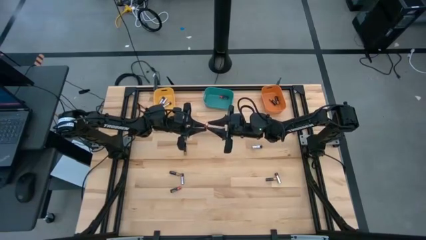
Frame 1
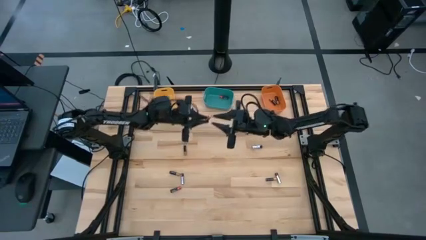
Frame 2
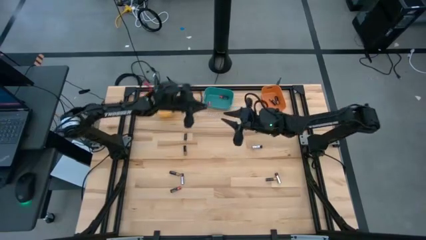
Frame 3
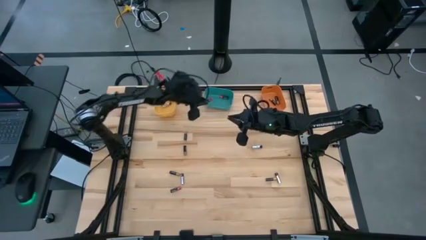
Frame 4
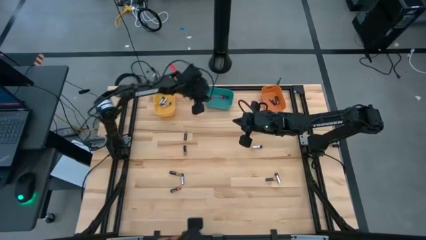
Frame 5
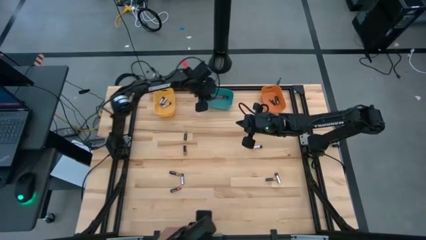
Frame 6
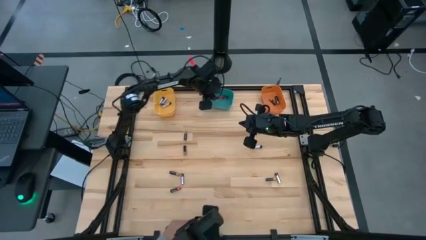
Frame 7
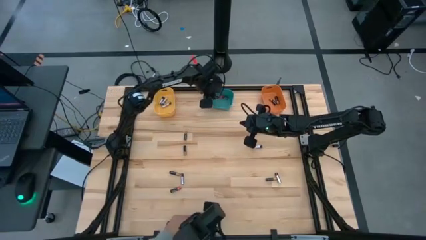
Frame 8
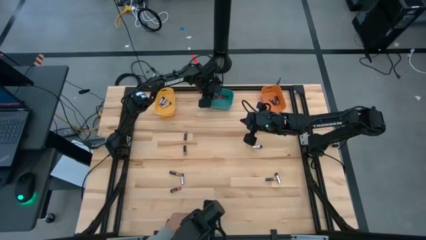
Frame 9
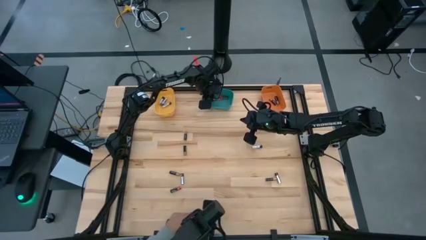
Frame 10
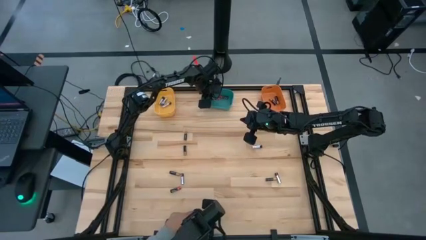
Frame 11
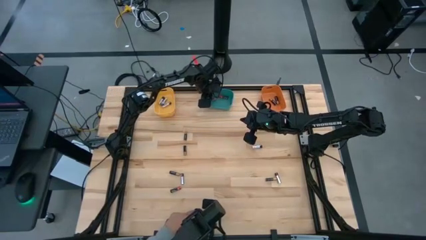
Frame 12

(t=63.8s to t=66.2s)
Task: Sort batteries
Put the red battery into the green bin

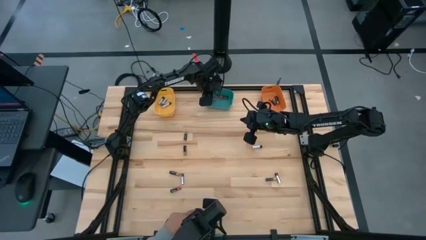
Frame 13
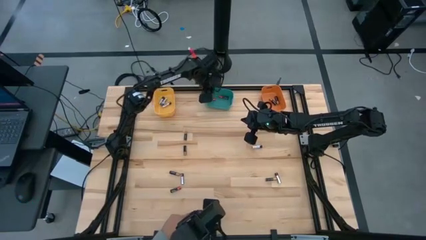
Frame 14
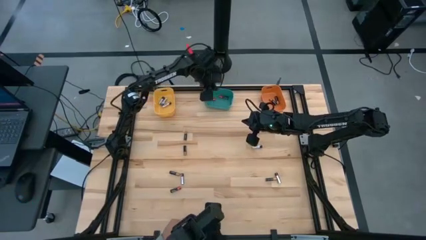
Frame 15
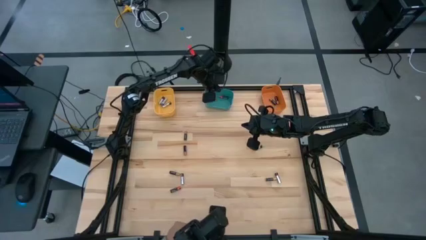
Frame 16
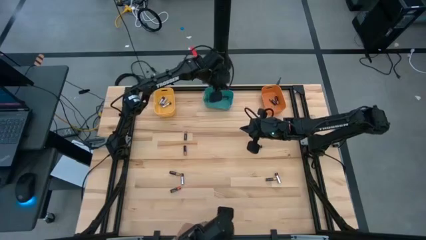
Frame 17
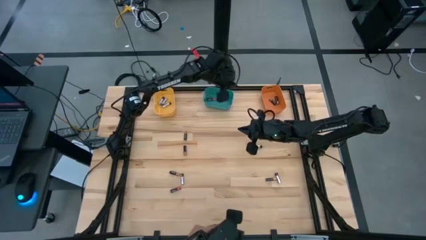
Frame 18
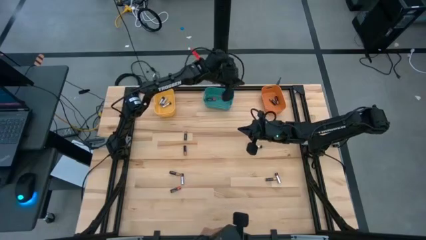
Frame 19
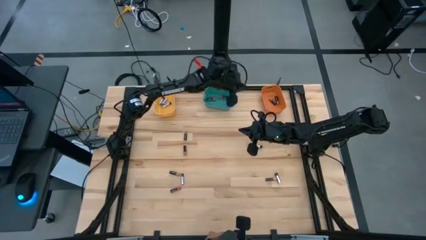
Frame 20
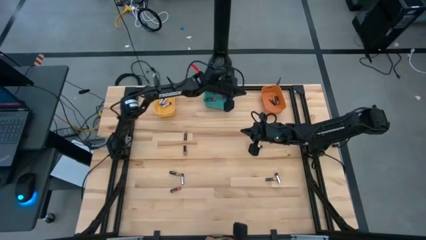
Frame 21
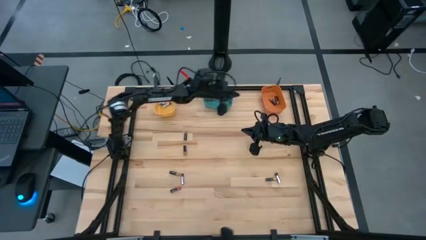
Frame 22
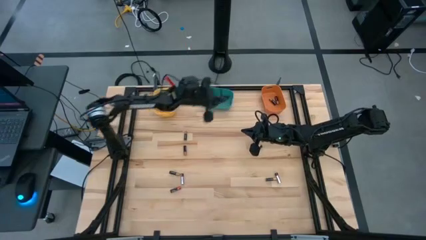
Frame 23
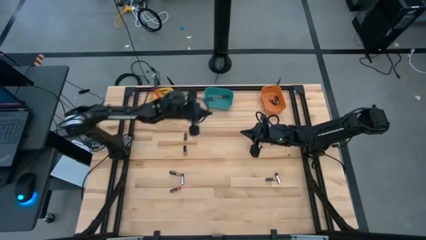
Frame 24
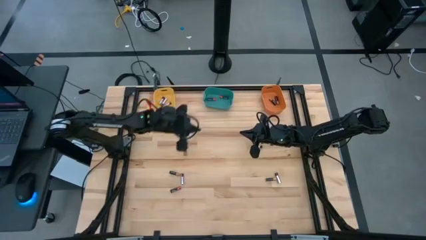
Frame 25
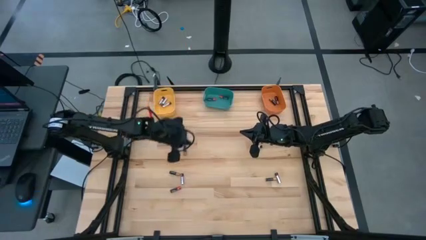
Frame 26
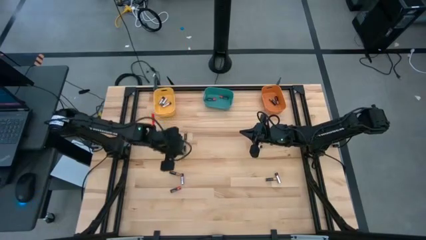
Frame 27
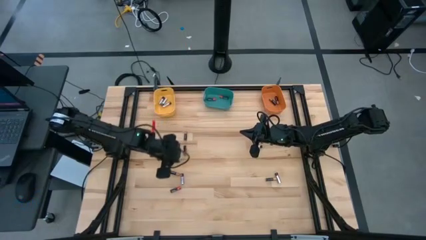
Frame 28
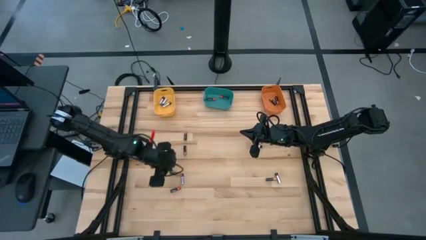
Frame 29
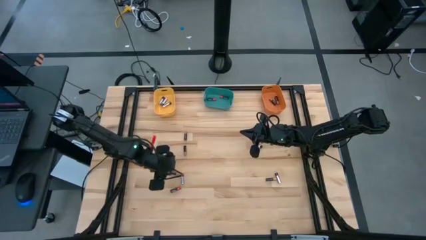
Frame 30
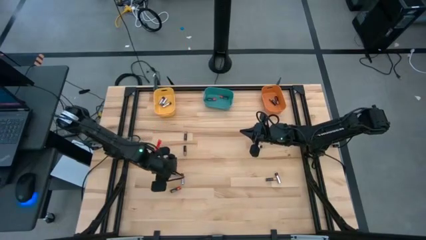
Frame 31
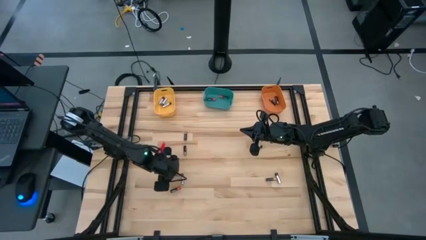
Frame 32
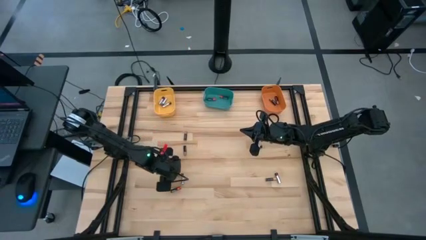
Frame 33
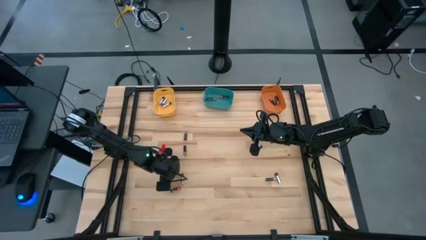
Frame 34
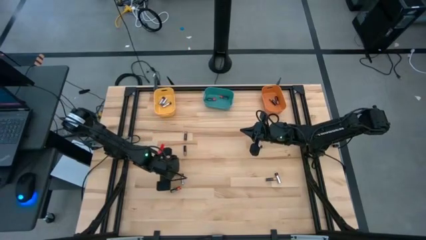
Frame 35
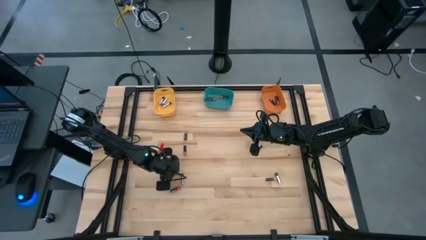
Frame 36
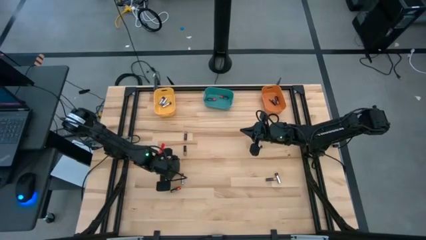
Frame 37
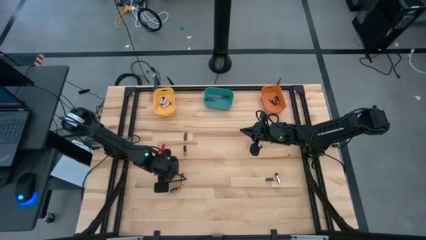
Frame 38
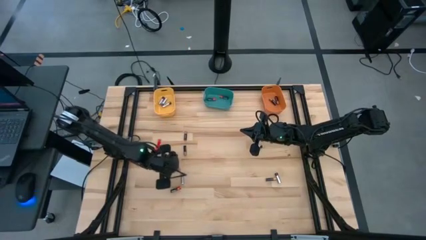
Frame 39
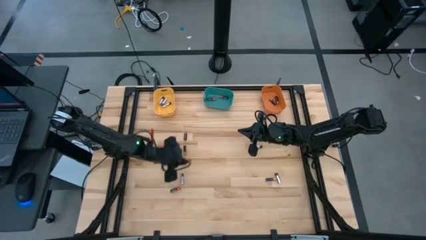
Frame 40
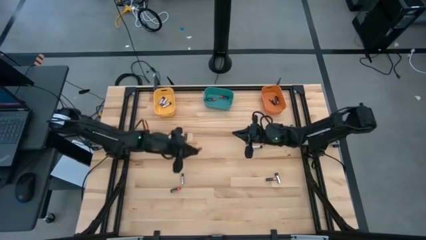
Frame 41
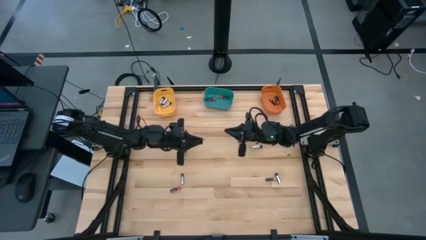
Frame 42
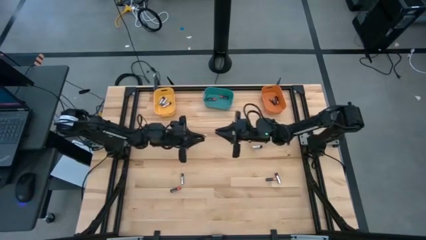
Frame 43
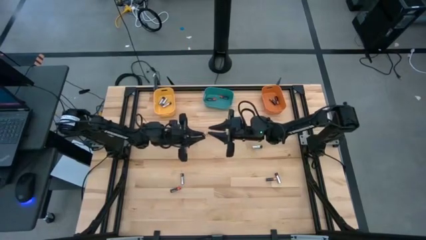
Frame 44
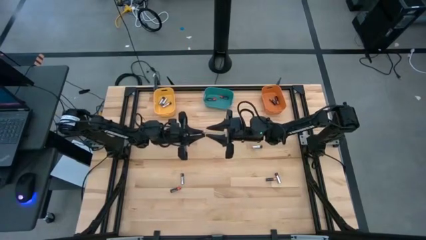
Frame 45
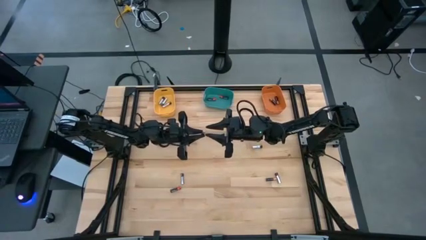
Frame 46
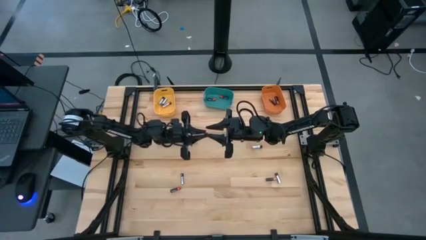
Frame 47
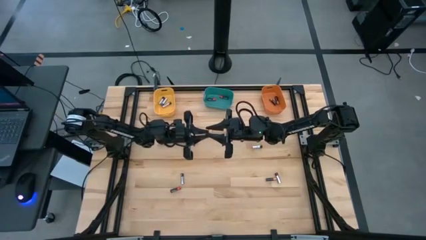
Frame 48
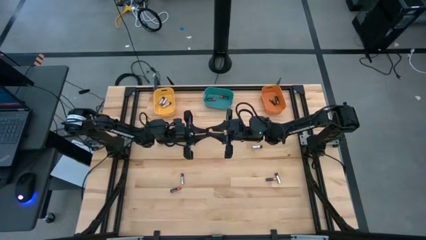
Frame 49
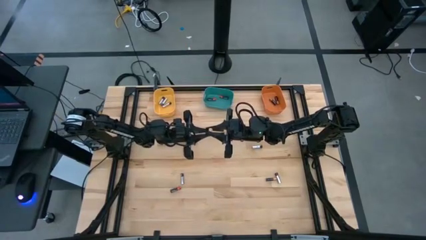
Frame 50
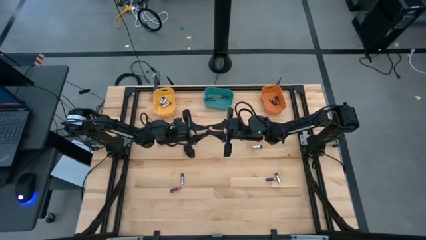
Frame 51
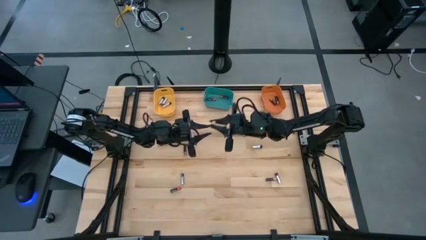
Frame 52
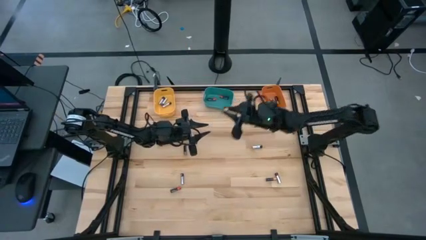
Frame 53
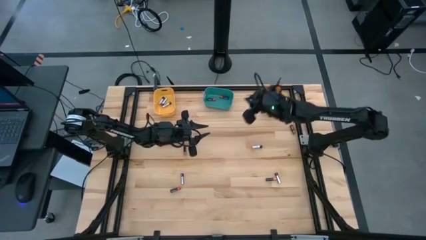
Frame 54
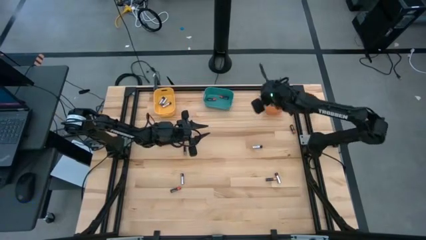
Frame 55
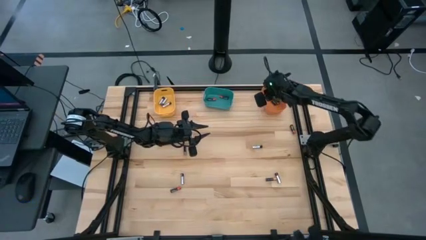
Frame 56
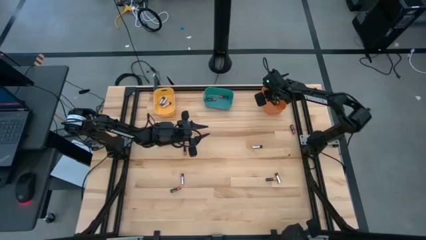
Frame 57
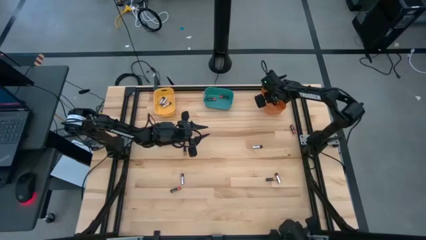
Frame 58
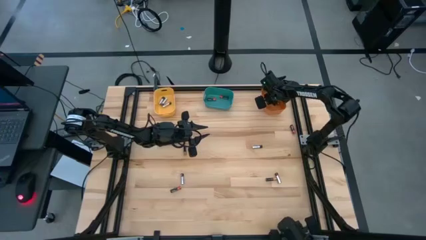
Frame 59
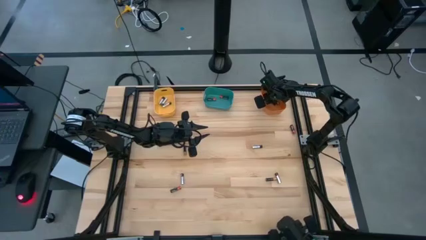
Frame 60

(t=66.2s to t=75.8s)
Put the brown battery into the orange bin

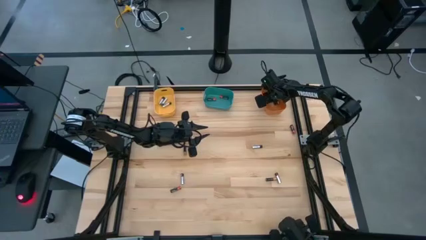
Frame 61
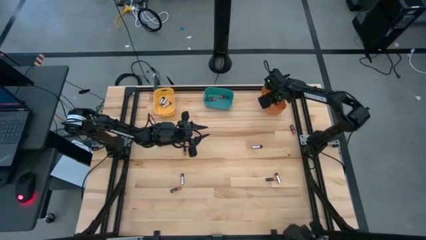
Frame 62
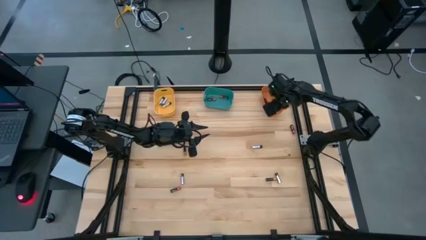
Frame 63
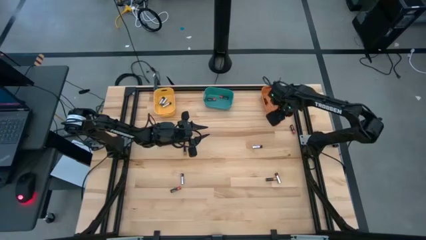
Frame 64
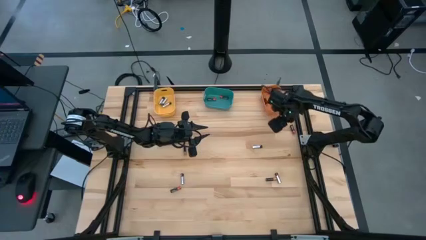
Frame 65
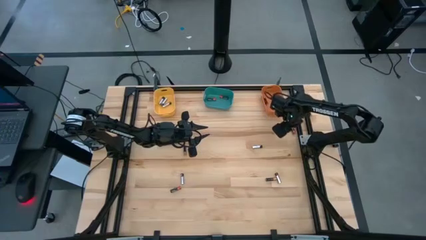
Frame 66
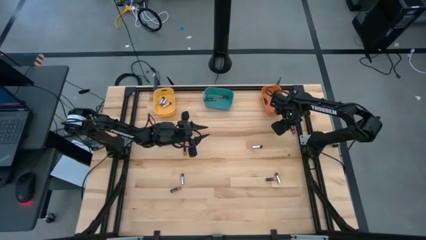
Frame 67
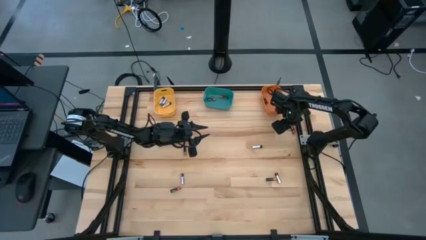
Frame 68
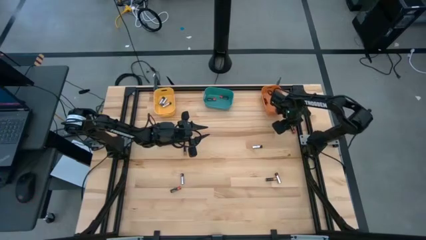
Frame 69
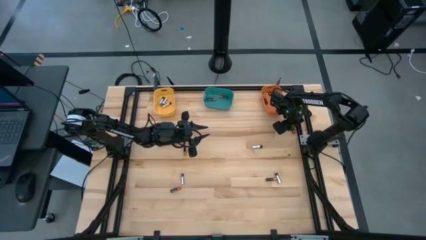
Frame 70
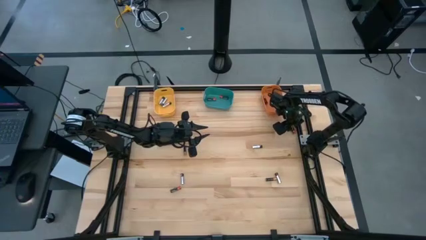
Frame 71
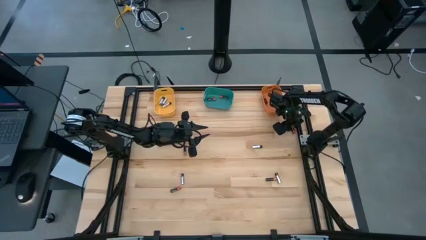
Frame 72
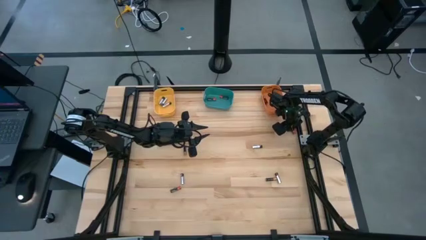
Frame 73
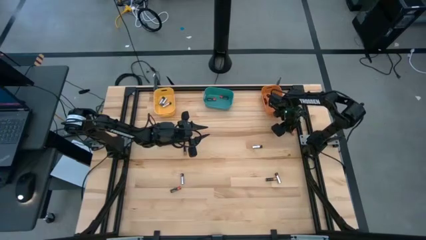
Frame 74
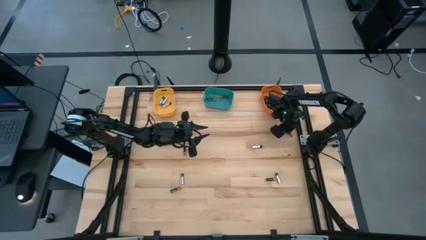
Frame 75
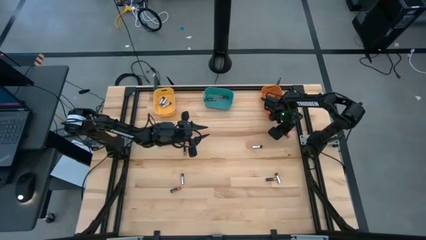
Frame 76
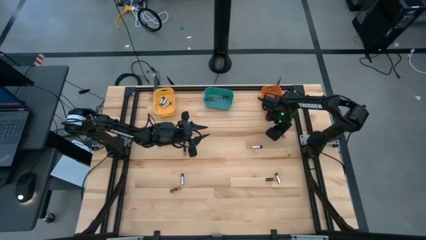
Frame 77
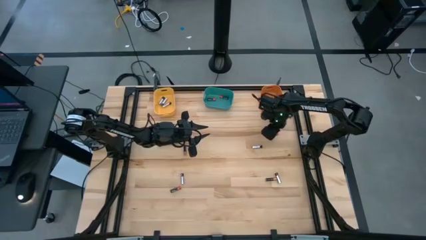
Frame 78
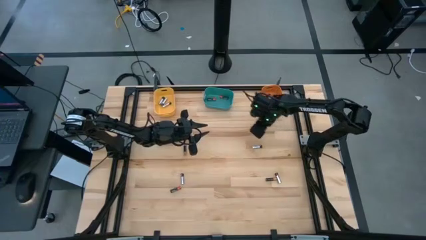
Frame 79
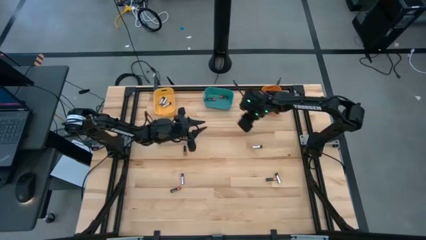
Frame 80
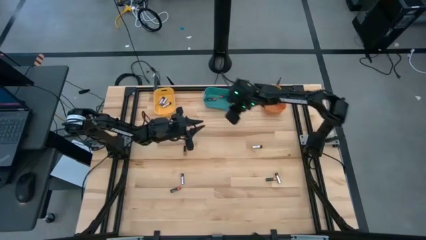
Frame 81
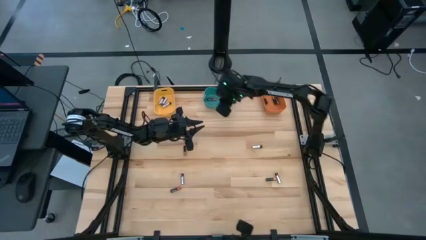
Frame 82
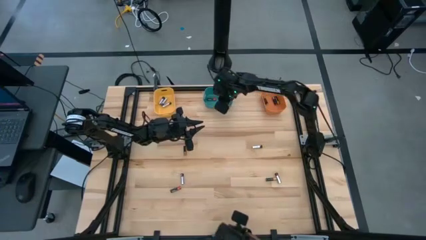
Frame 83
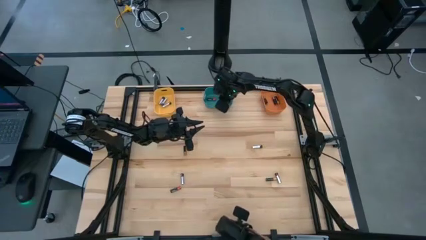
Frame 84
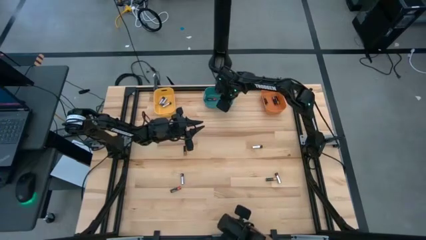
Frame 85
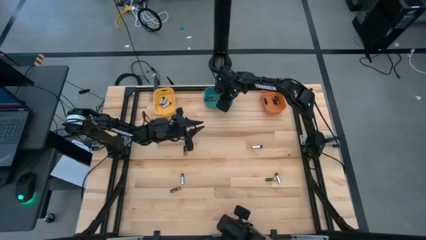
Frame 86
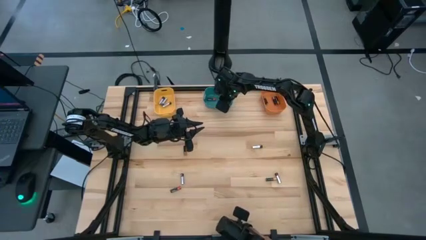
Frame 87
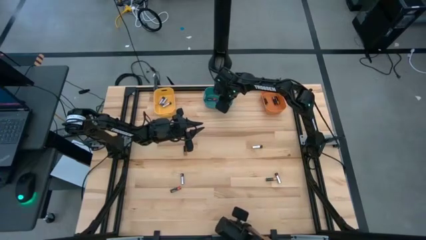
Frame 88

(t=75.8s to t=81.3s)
Put the red battery into the green bin
